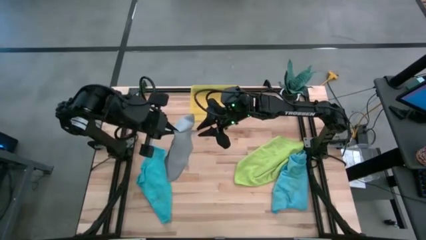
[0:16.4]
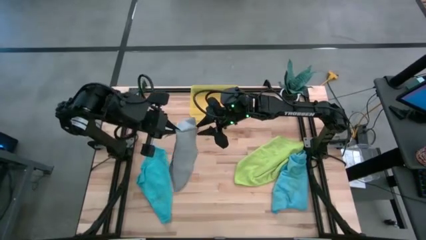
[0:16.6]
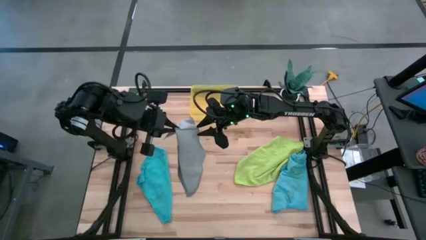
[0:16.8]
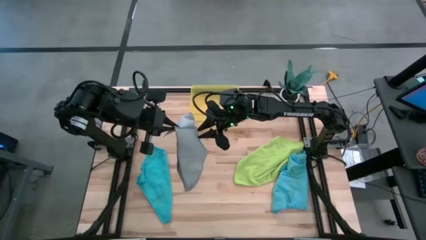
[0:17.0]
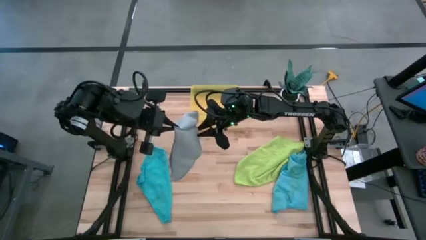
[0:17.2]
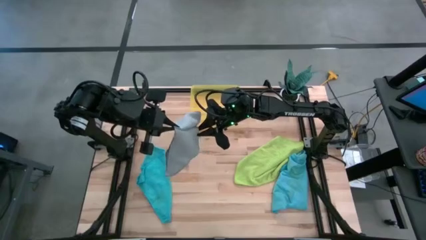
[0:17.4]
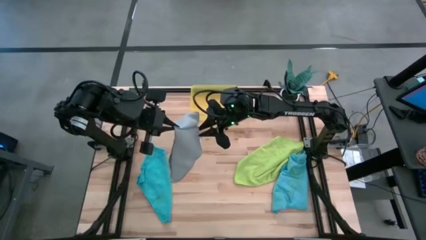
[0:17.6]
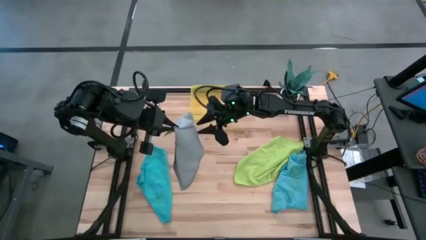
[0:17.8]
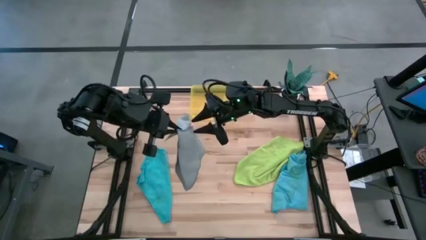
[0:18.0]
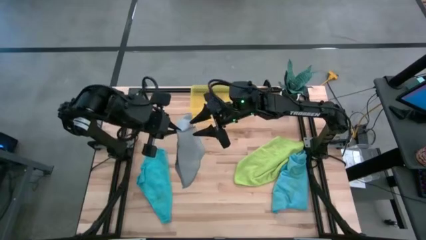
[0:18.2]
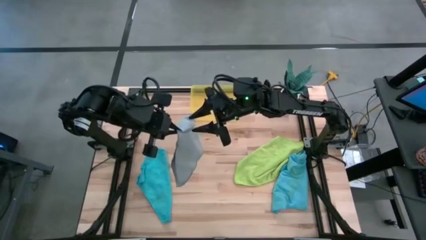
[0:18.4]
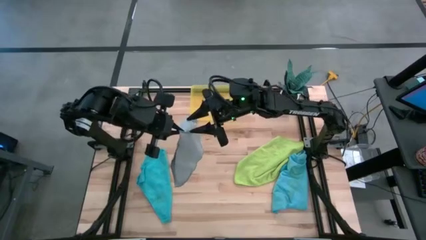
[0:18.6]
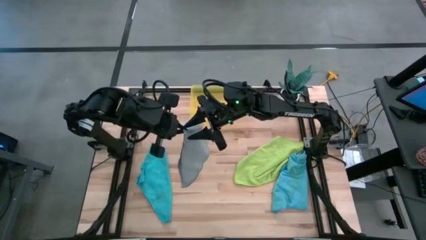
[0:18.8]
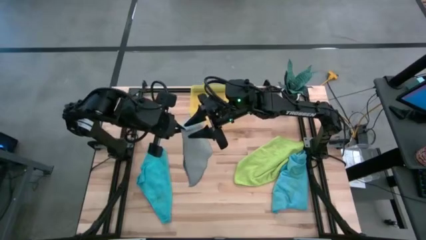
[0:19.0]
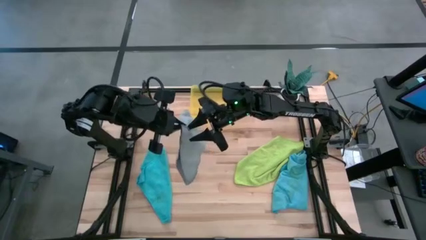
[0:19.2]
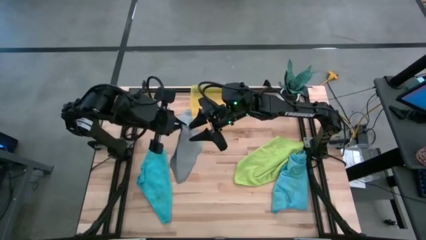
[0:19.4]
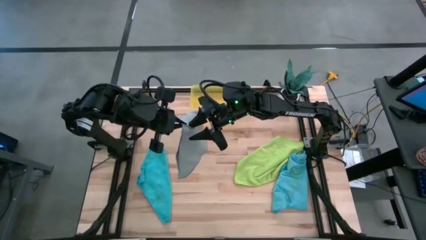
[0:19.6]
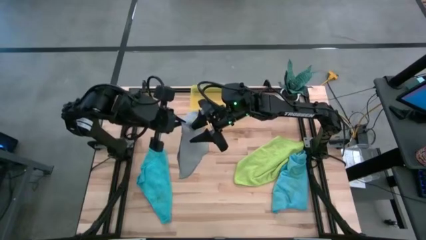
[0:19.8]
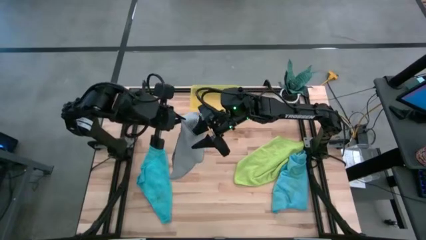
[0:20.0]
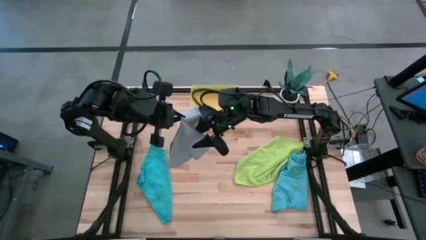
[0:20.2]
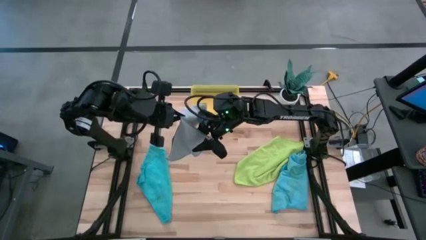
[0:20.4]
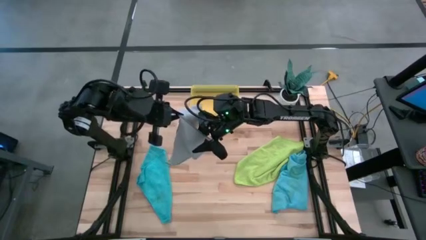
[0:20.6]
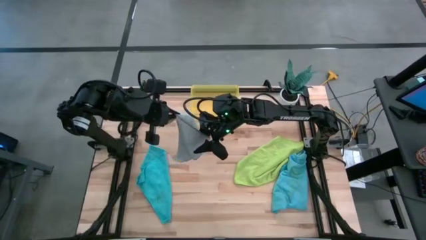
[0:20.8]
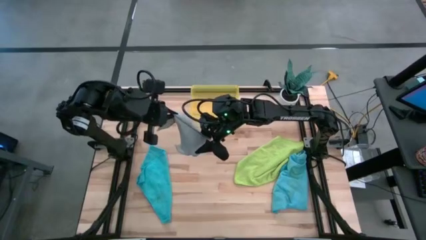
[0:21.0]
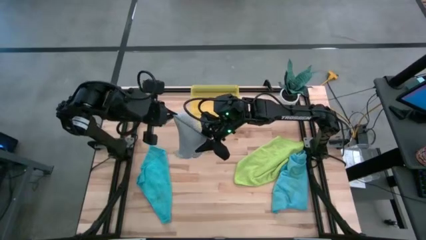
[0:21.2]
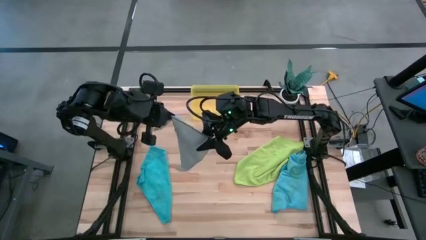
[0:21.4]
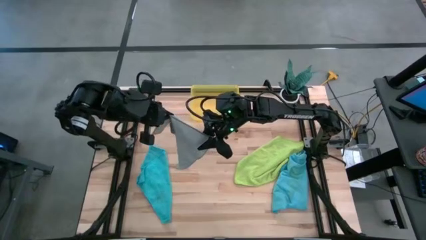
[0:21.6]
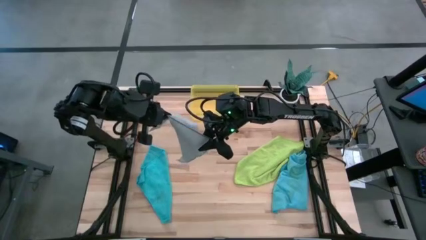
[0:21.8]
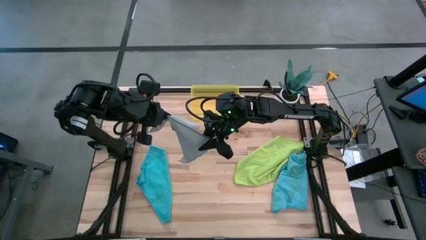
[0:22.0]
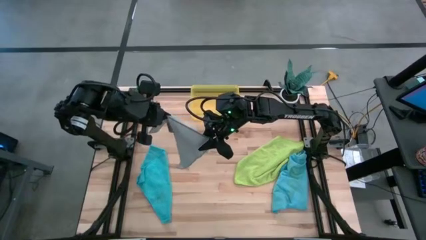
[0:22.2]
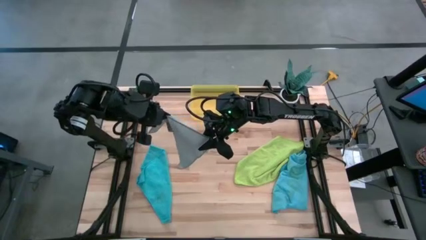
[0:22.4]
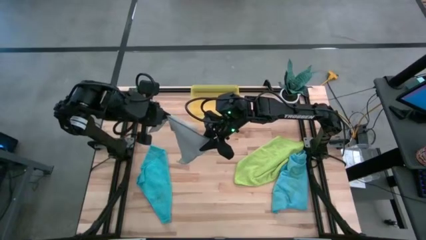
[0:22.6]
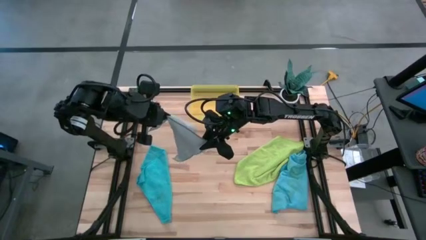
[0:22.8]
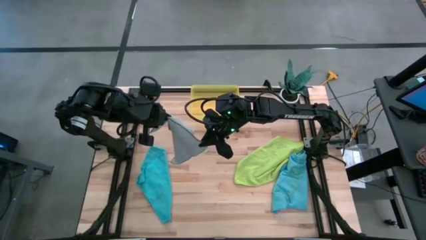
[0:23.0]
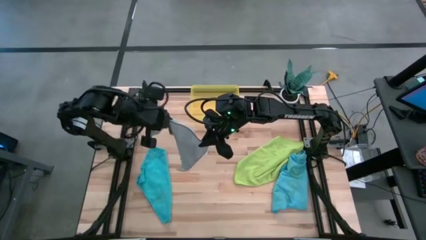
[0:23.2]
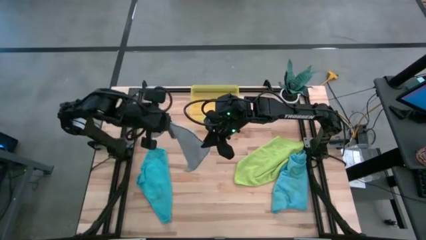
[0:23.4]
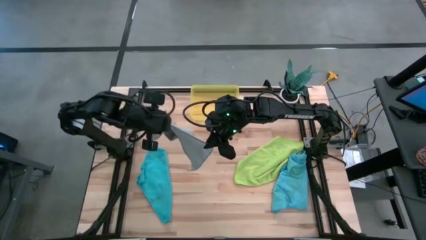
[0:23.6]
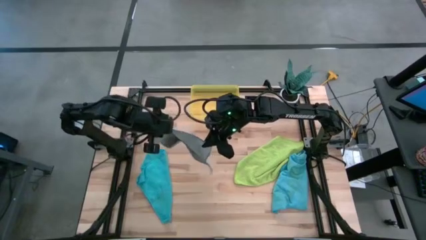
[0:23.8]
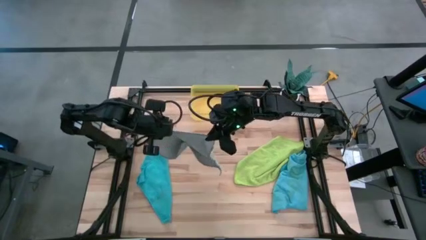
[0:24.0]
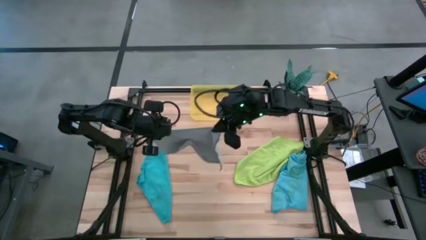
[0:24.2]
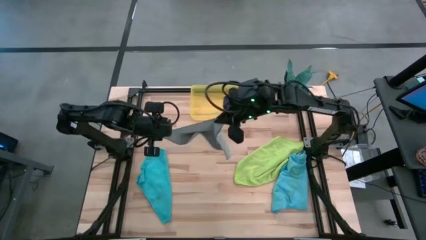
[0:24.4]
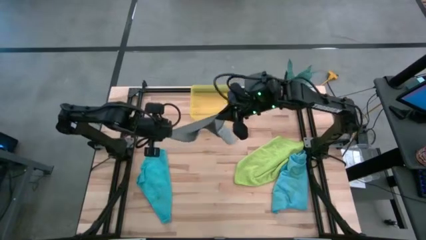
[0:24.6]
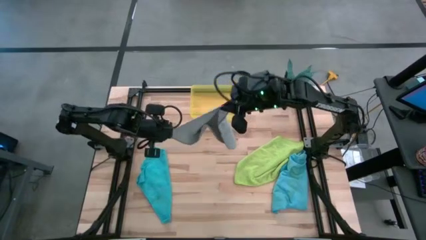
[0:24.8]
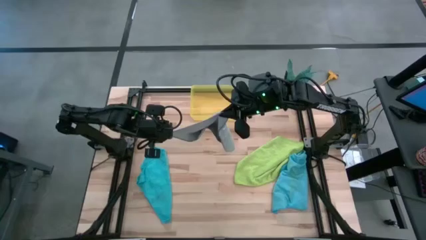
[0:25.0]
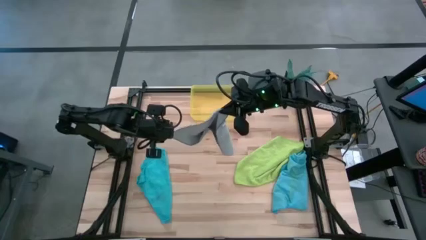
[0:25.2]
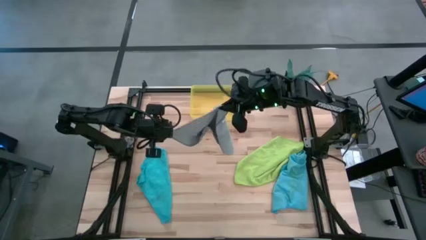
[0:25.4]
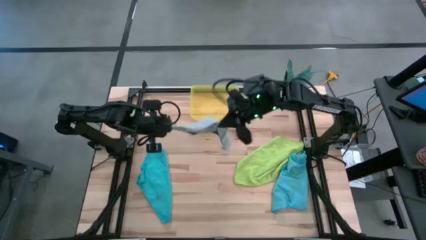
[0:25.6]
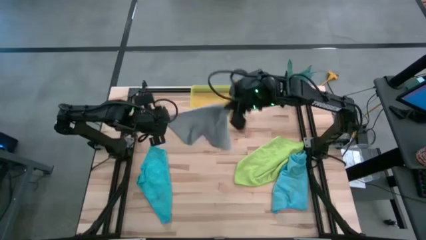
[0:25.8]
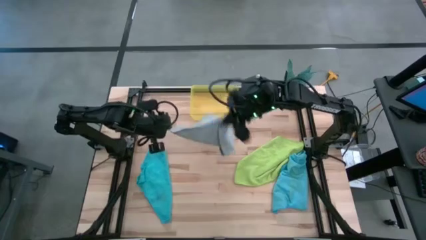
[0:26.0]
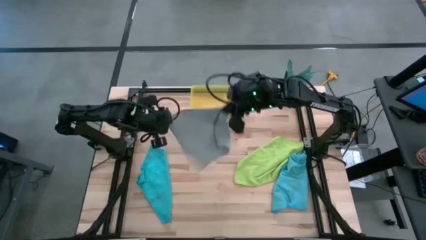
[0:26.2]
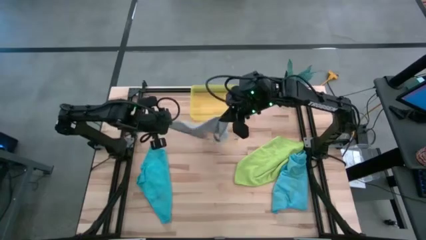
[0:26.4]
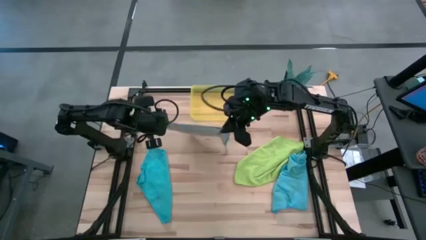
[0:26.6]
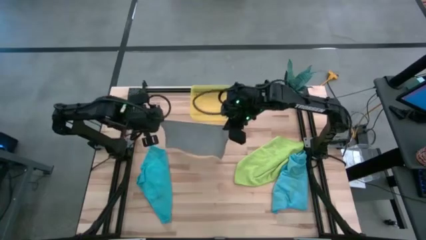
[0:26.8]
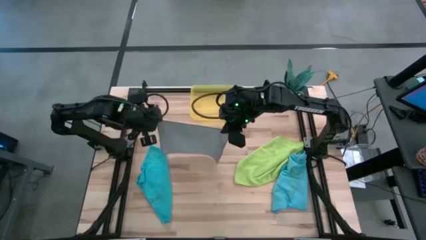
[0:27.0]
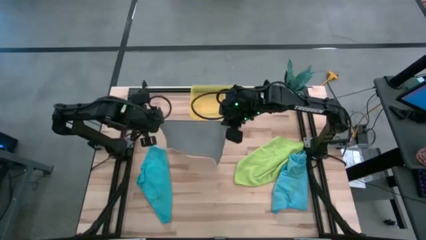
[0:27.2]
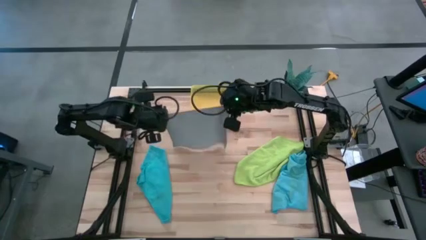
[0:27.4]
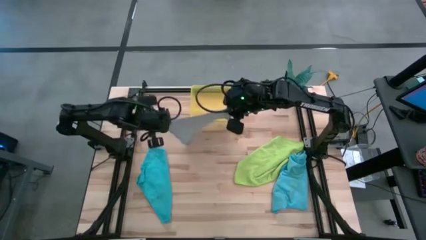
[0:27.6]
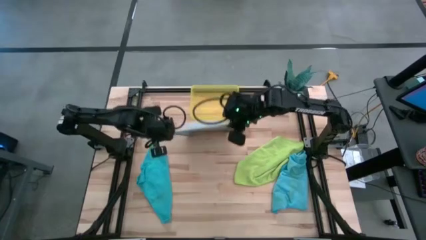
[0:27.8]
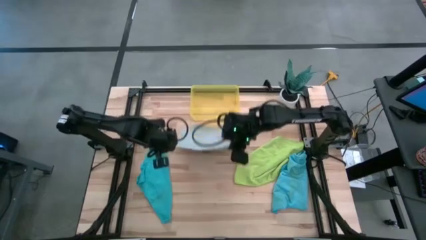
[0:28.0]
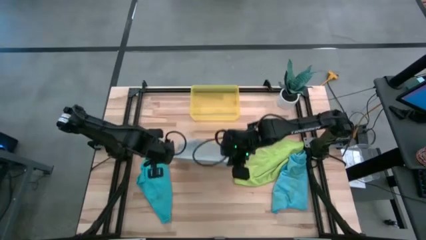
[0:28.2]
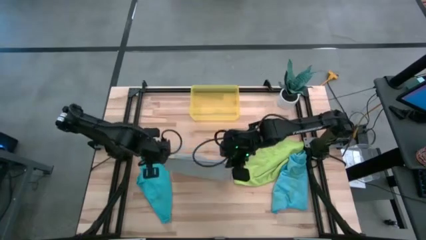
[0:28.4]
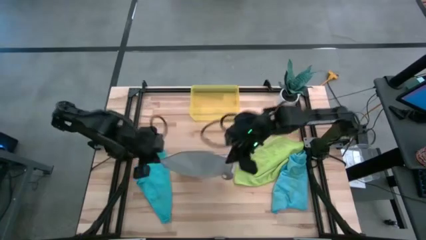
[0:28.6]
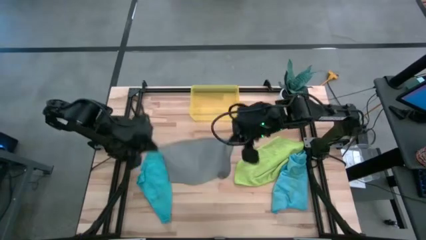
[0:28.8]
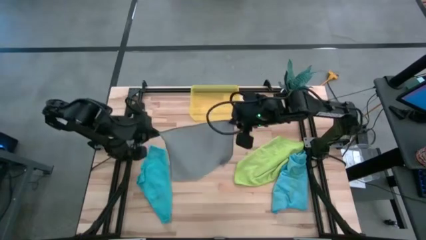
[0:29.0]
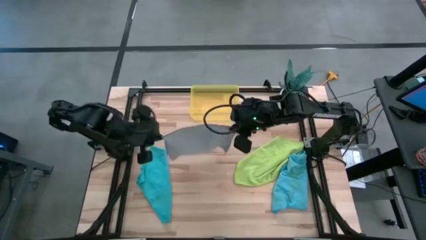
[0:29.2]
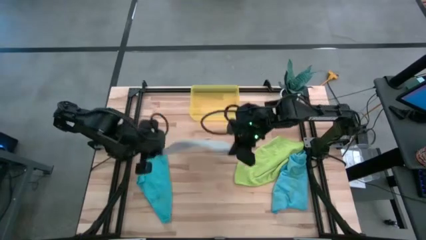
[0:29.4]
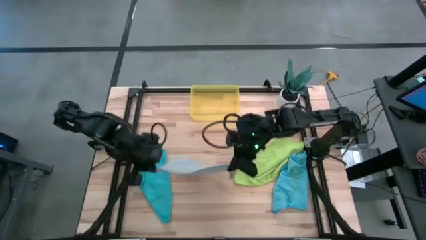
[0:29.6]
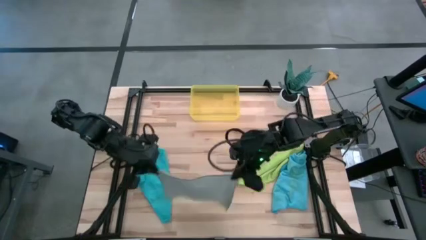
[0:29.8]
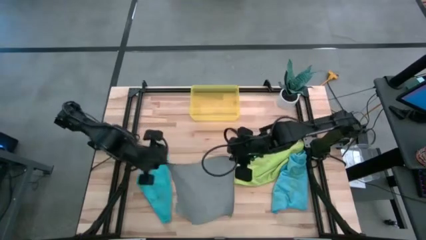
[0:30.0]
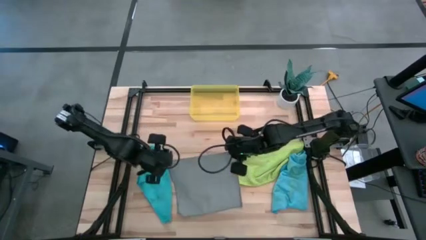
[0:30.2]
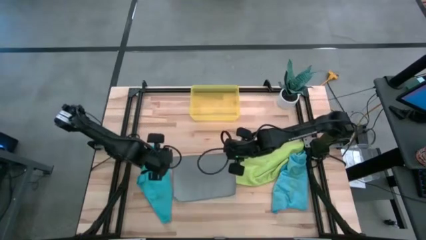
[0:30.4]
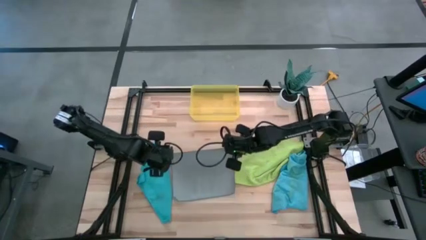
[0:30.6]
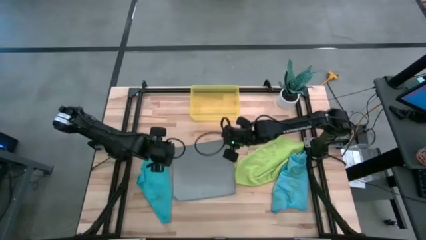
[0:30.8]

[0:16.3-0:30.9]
Task: Fold microfiber towels
Fold the gray microfiber cloth

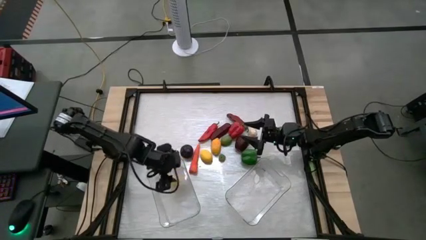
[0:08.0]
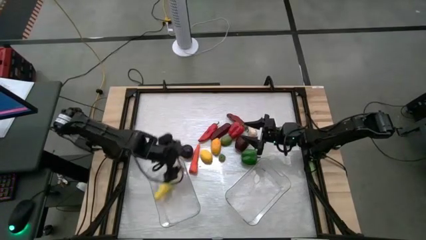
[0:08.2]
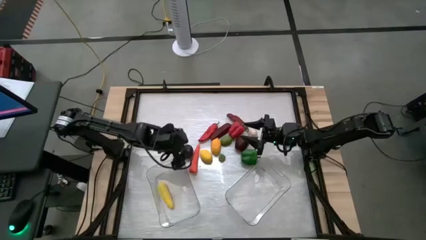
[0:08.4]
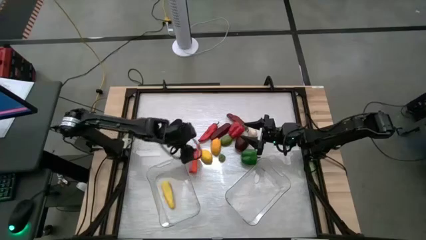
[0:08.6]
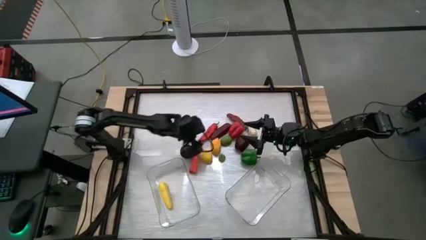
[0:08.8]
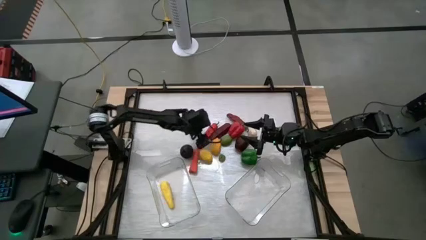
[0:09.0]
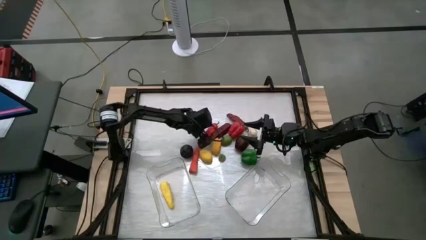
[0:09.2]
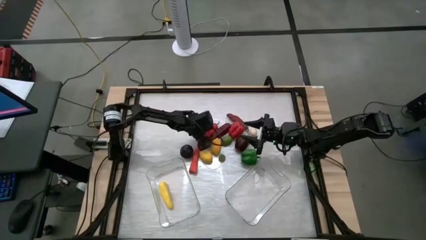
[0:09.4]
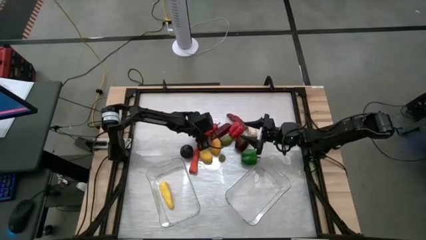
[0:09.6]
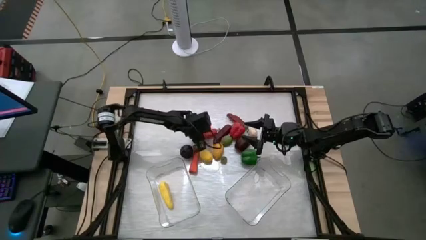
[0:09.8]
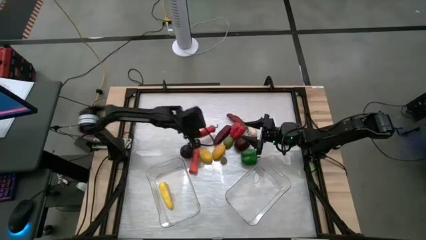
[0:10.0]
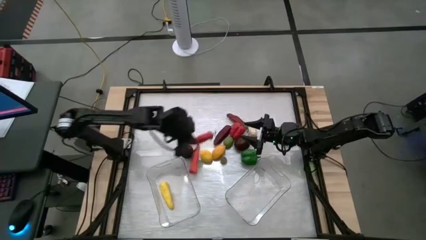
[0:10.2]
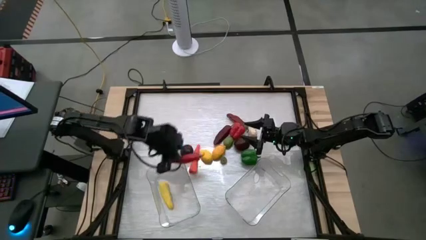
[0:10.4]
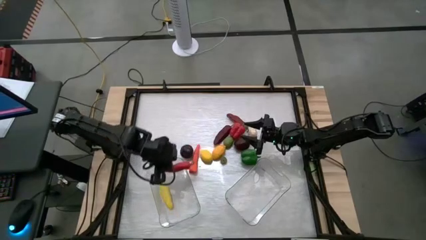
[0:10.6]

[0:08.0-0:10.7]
Task: Sort produce into baskets
Put the orange chili pepper into the left transparent bin

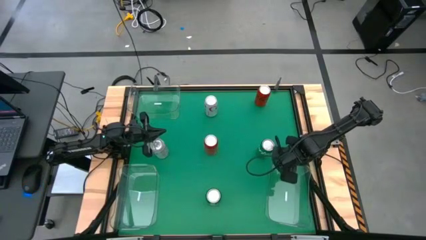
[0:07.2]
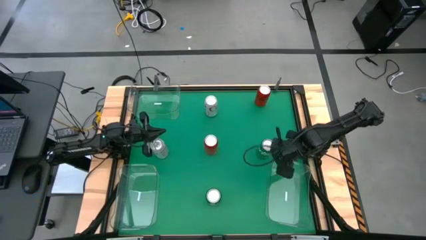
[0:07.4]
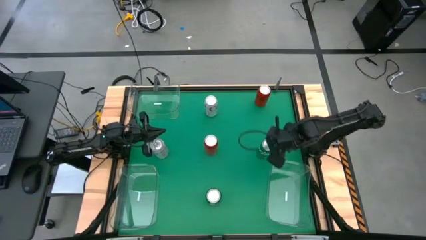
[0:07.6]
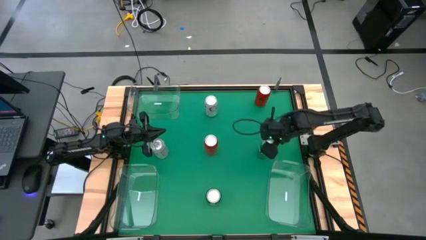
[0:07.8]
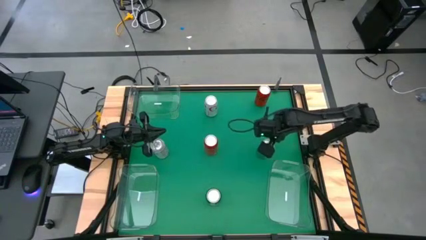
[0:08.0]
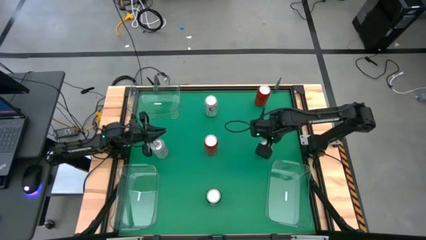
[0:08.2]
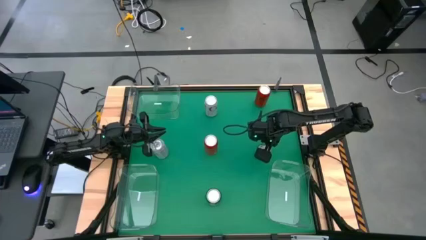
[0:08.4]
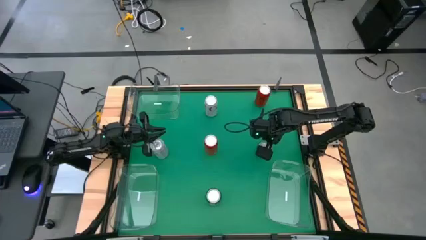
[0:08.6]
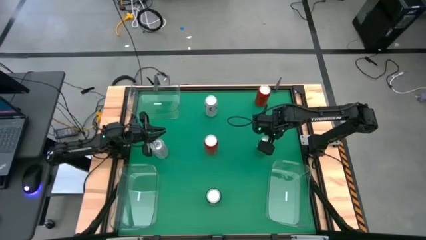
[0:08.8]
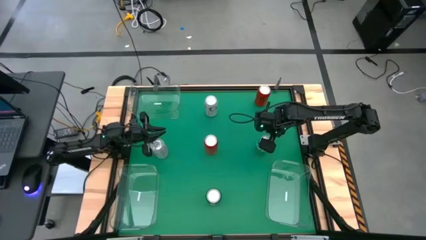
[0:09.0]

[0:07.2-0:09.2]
Task: Sort soda cans
Put the right green soda can into the bottom right transparent bin
